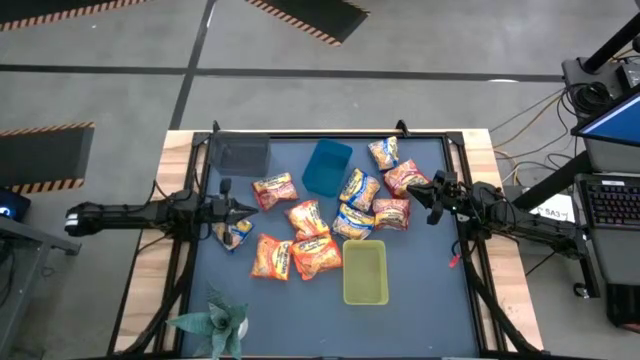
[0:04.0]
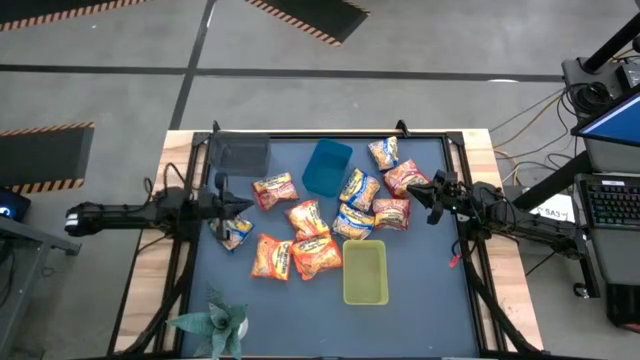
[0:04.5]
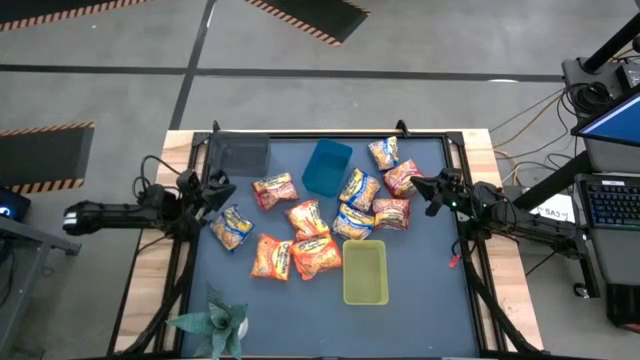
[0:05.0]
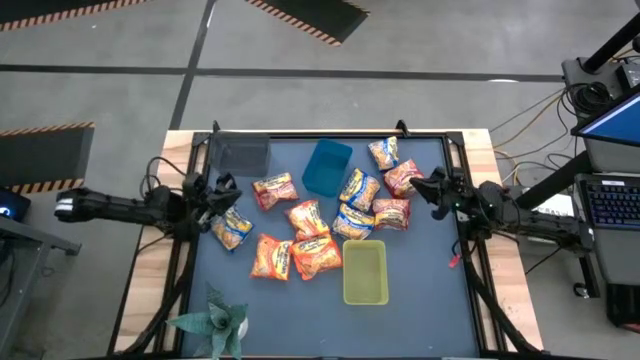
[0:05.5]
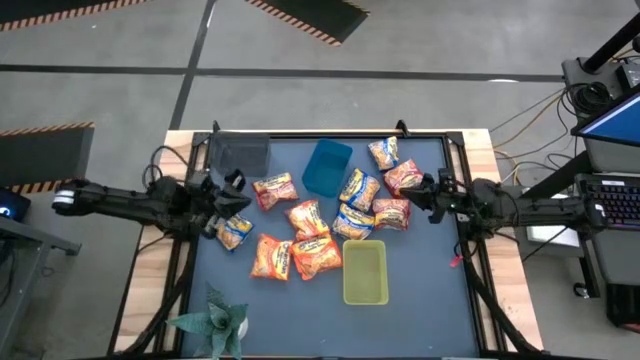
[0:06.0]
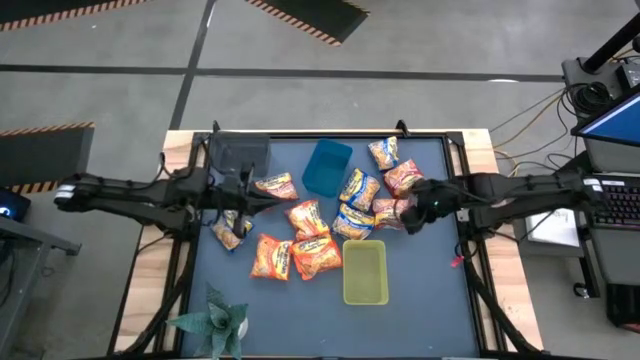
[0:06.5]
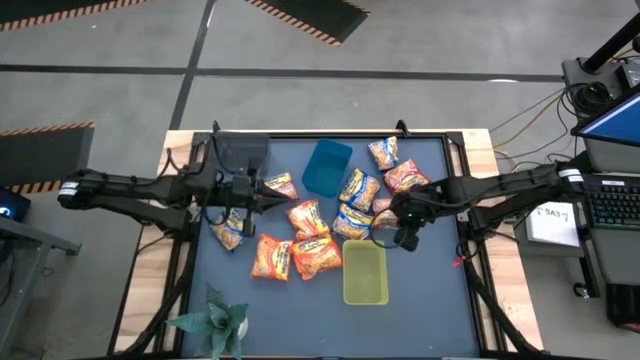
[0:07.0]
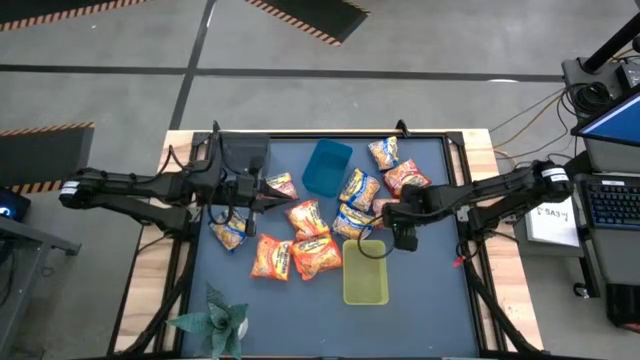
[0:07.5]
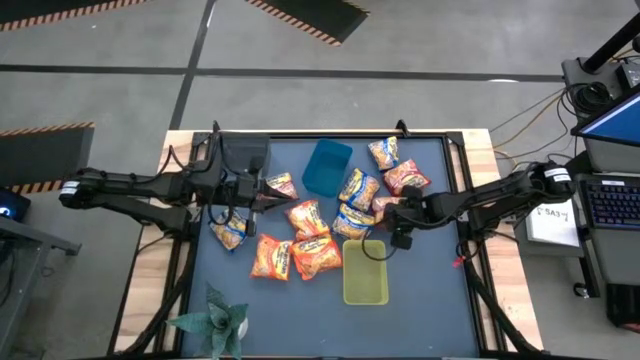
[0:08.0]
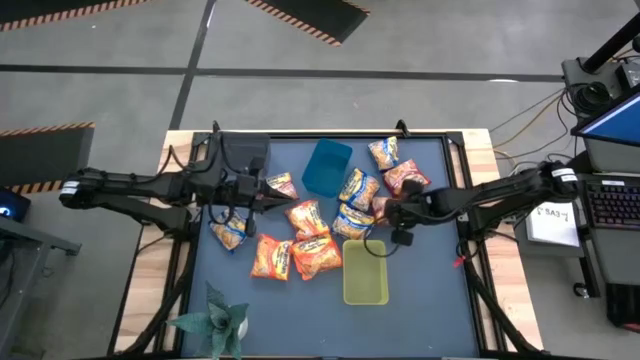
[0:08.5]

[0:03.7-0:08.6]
Task: Sort Maruchan noodles
Put the red noodle pack into the yellow bin

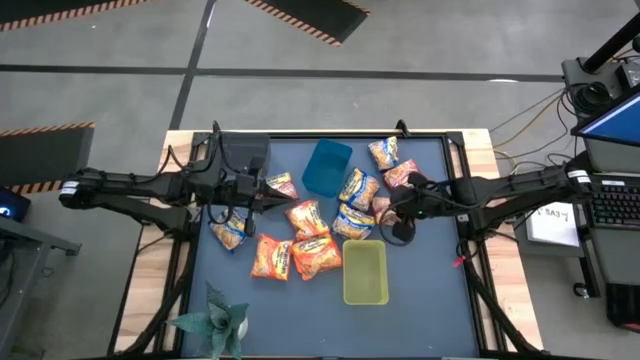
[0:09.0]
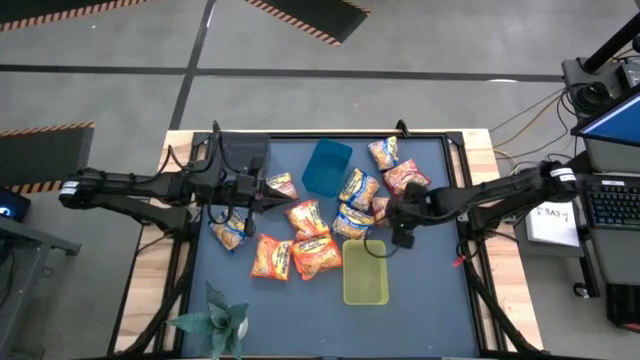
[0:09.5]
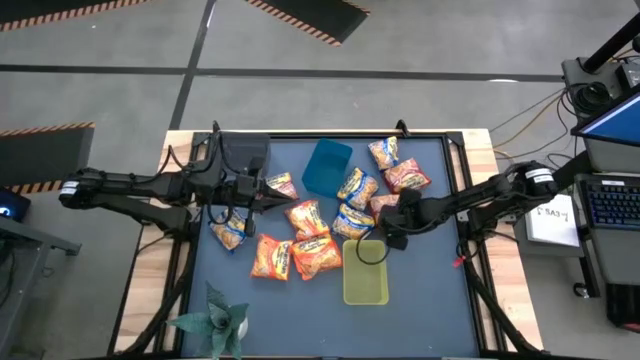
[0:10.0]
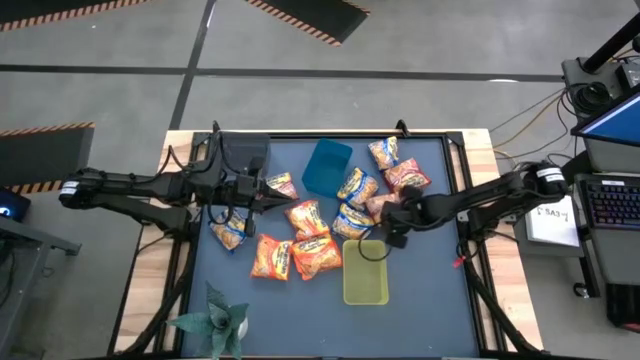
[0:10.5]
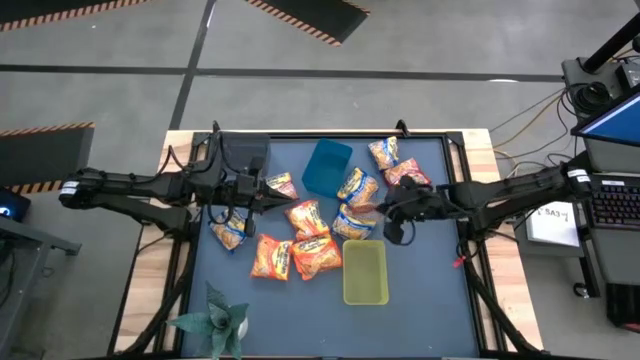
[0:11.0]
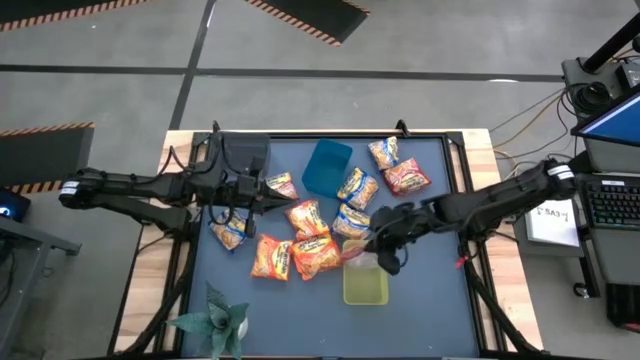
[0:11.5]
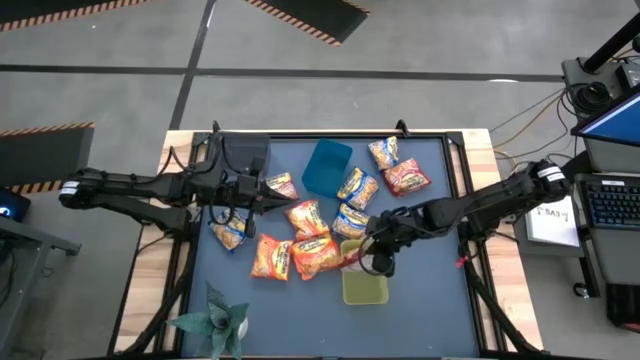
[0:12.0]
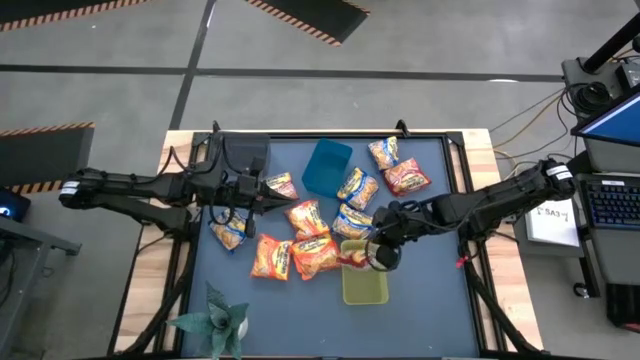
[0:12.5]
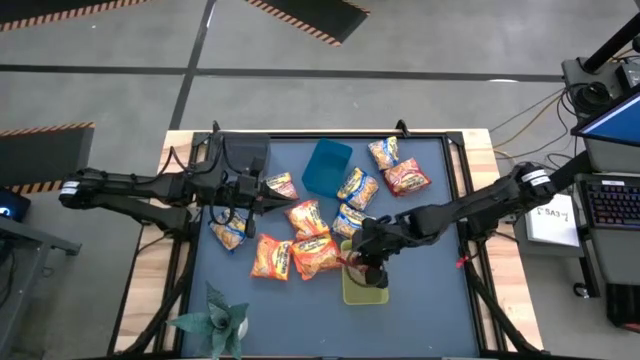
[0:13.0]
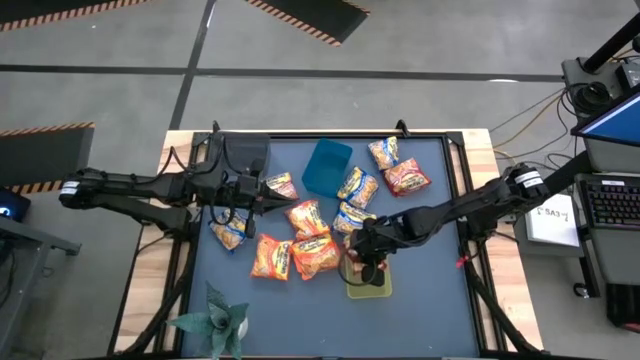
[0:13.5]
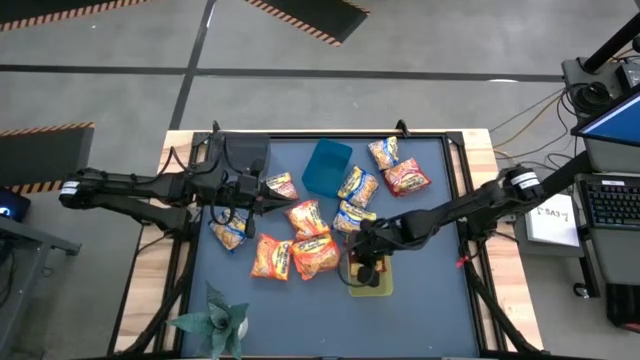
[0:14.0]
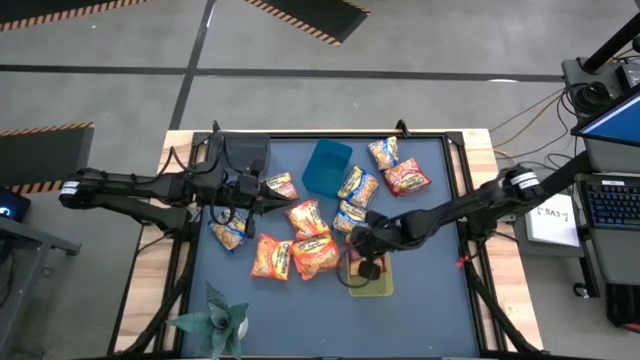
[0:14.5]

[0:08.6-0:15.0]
Put the red noodle pack into the yellow bin

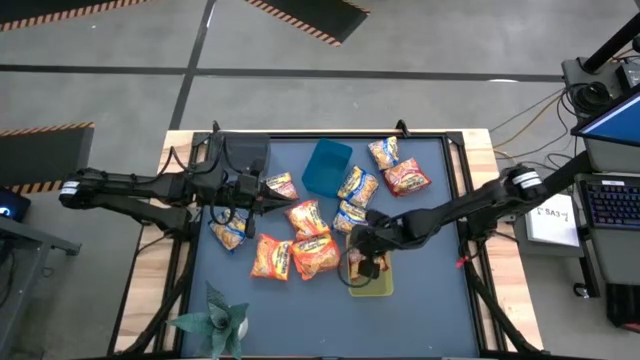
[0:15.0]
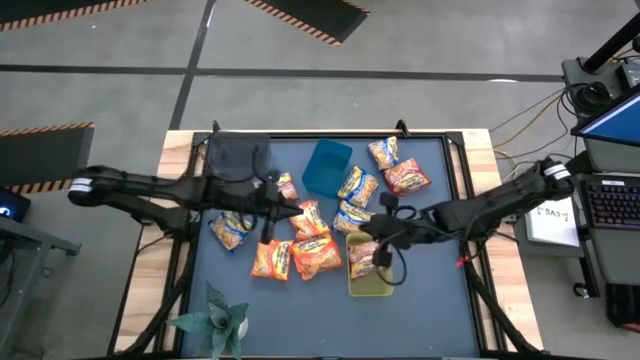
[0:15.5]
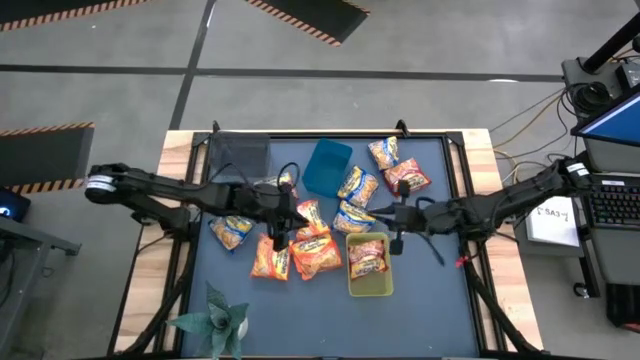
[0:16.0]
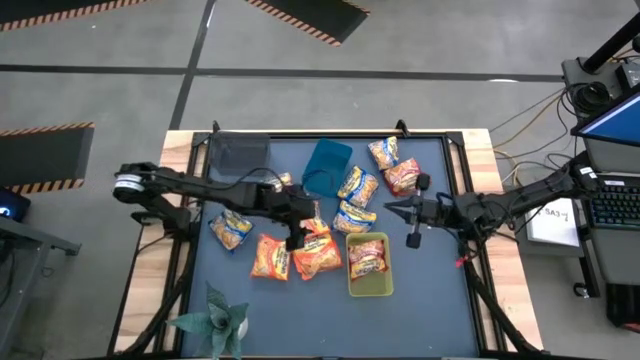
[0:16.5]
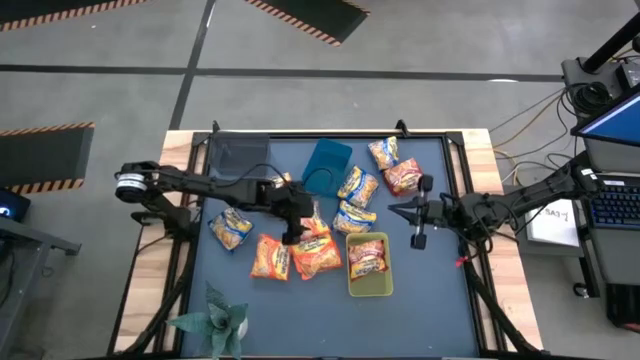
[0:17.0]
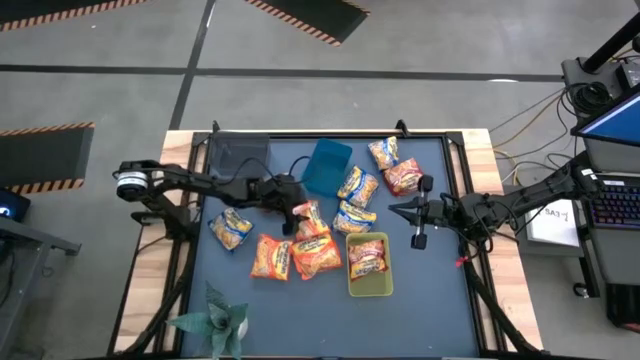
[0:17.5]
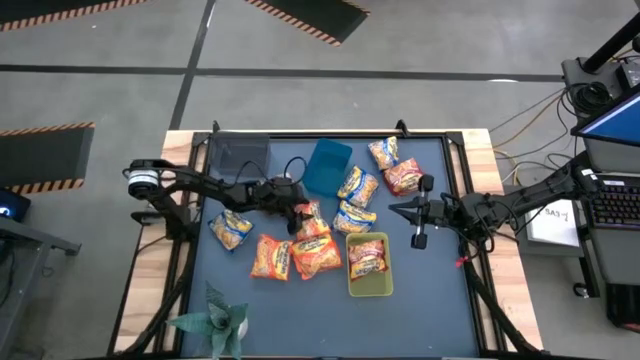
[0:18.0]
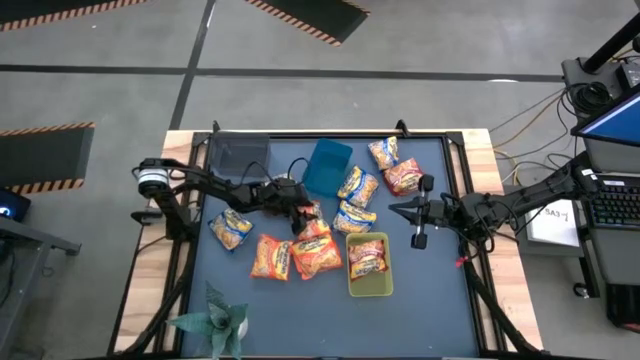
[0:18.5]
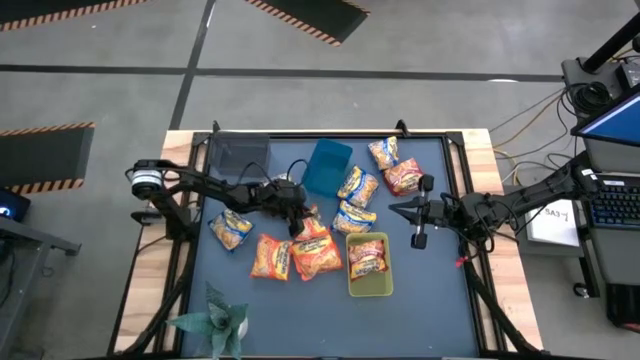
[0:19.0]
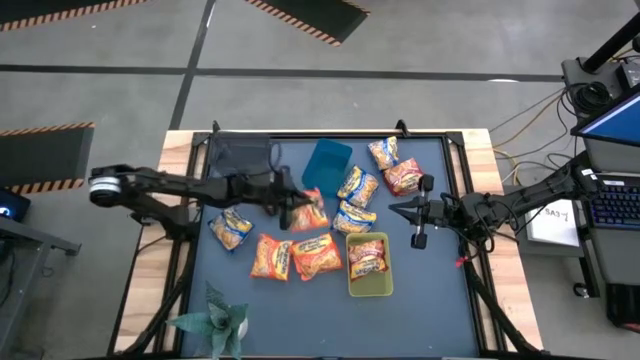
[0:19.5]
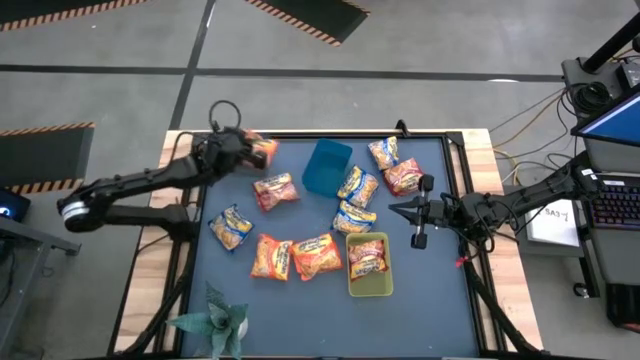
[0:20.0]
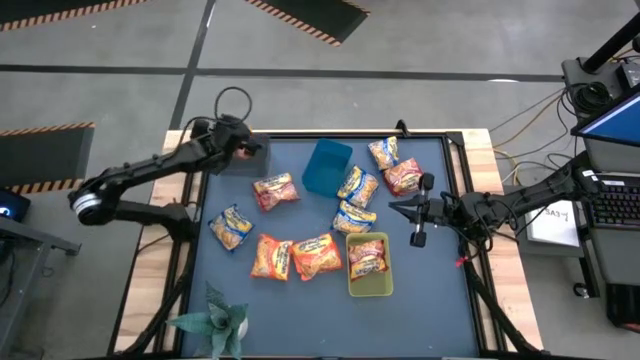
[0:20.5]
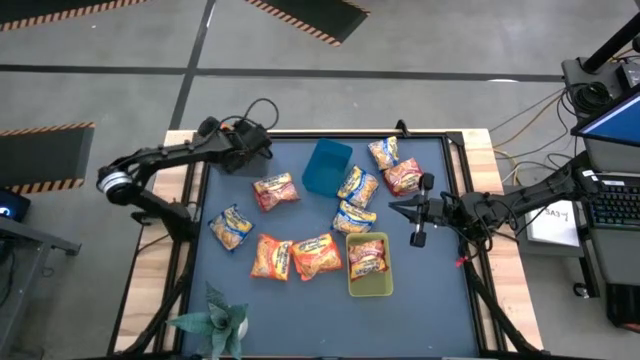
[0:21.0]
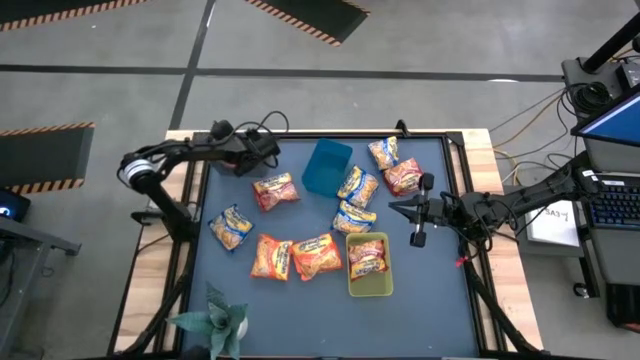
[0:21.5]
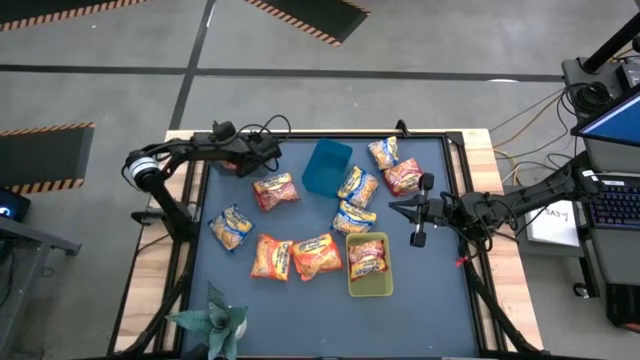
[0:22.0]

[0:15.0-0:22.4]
Put the orange noodle pack into the black bin

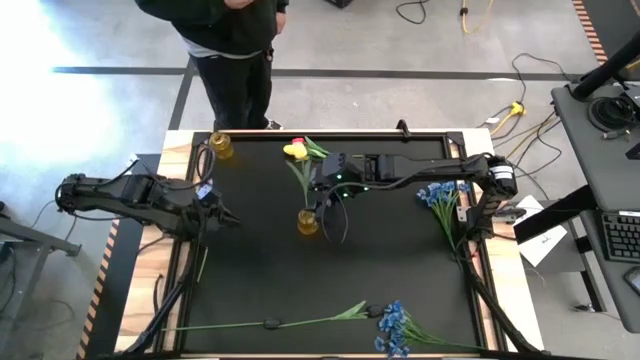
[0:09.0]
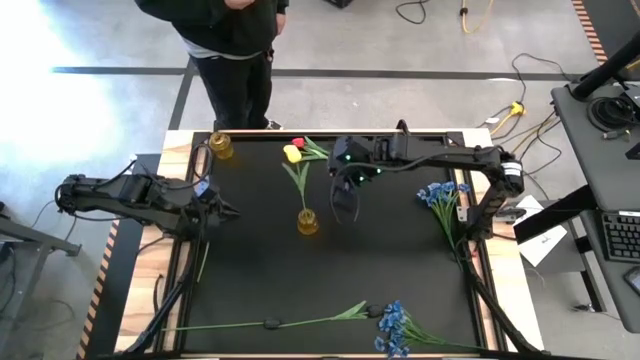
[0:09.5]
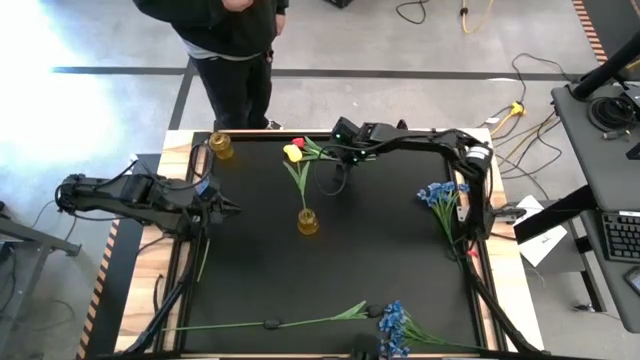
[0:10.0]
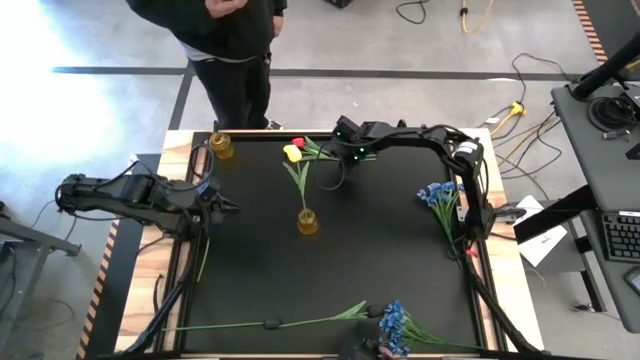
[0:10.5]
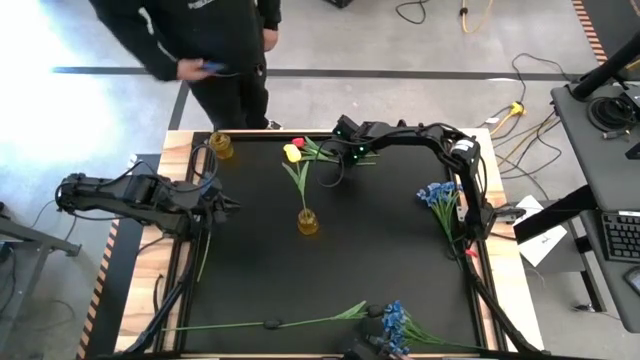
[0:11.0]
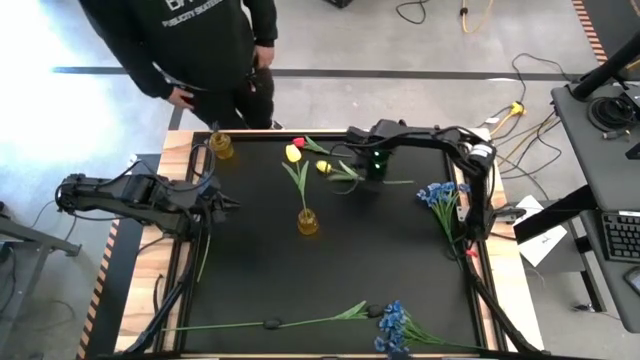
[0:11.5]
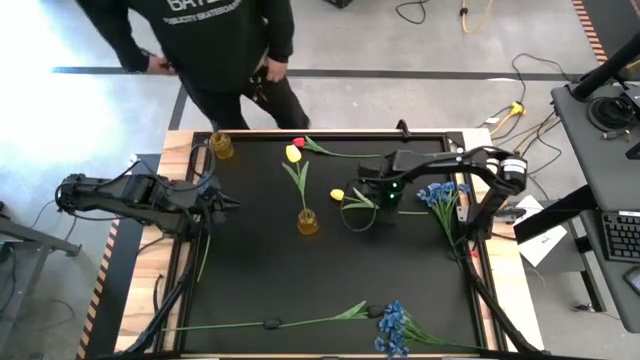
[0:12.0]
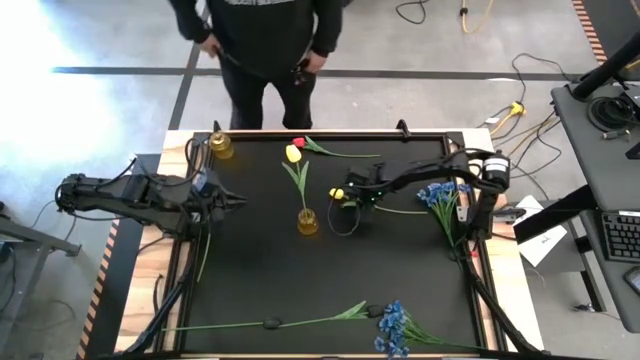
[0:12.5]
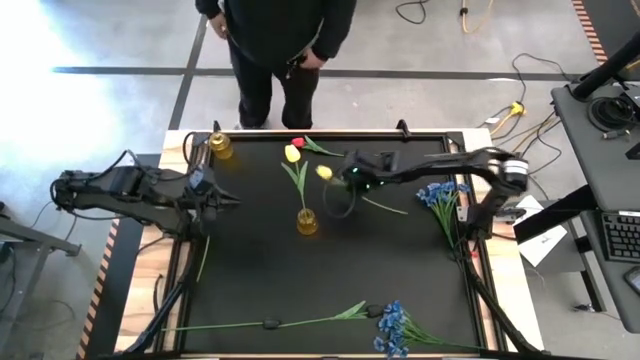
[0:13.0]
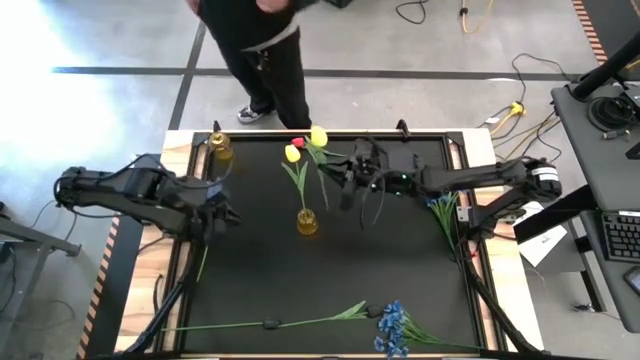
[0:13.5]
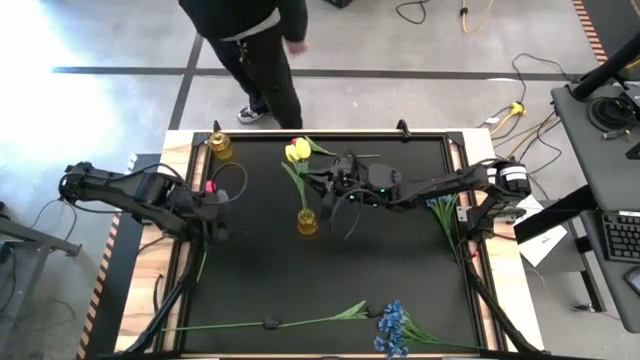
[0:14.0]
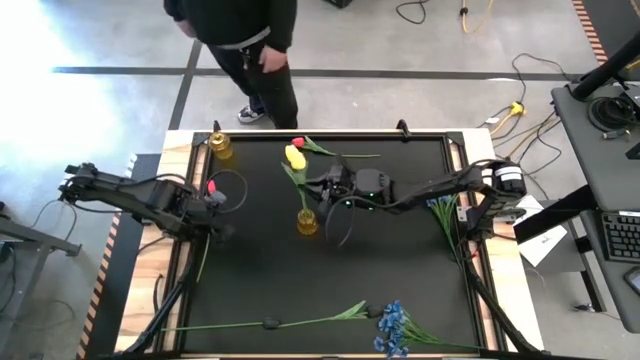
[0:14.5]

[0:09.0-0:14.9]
Task: Sort flowers into vase by color
Put the yellow tulip into the bottom vase
